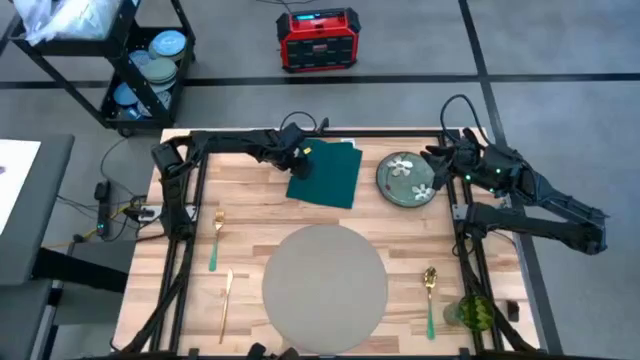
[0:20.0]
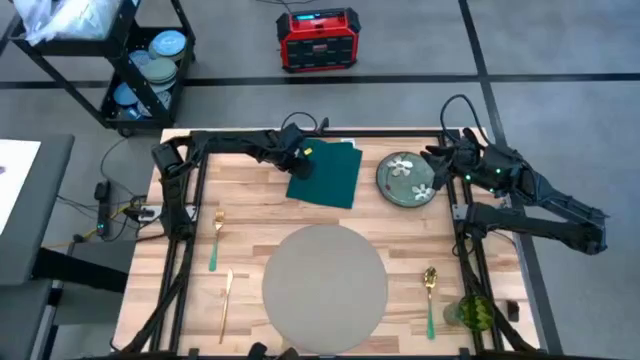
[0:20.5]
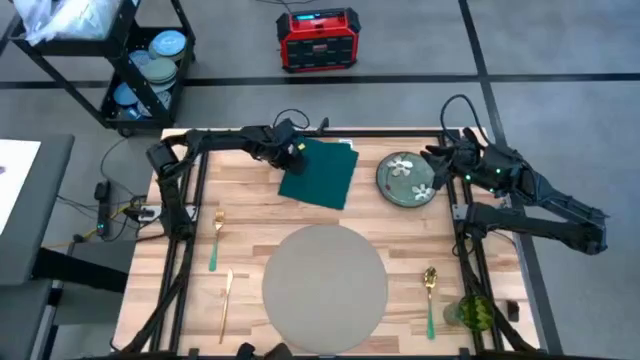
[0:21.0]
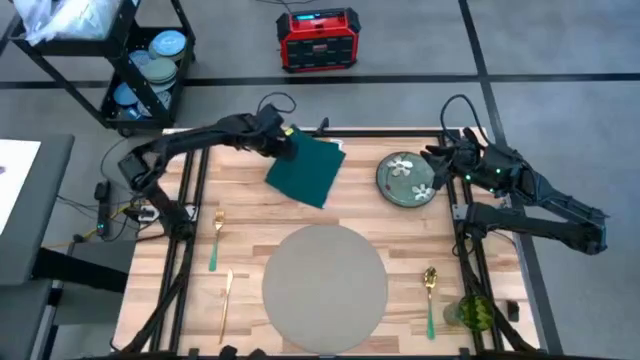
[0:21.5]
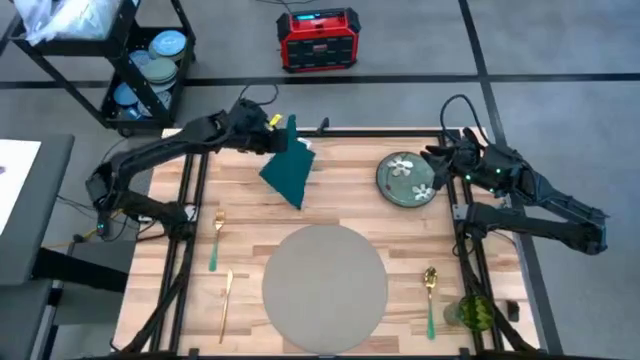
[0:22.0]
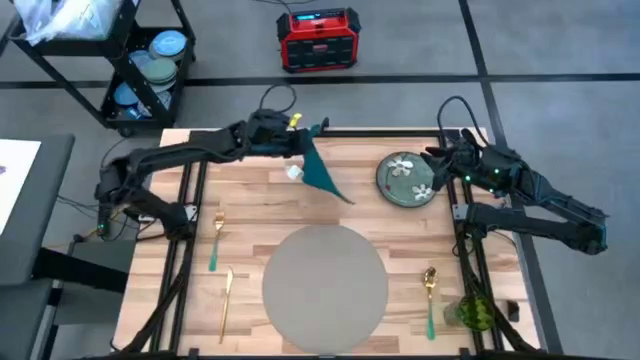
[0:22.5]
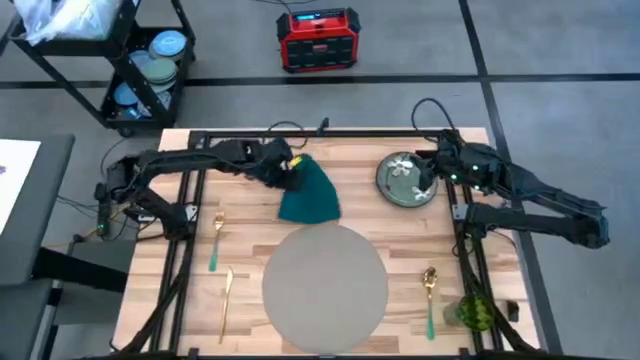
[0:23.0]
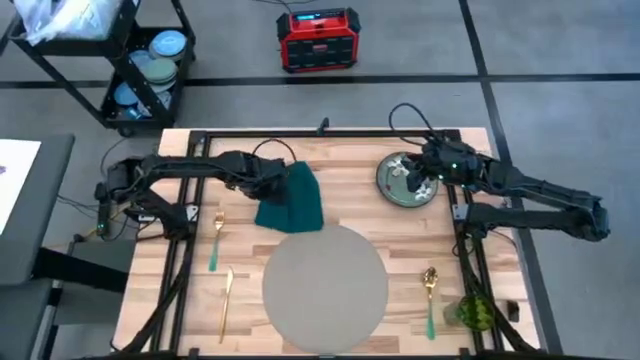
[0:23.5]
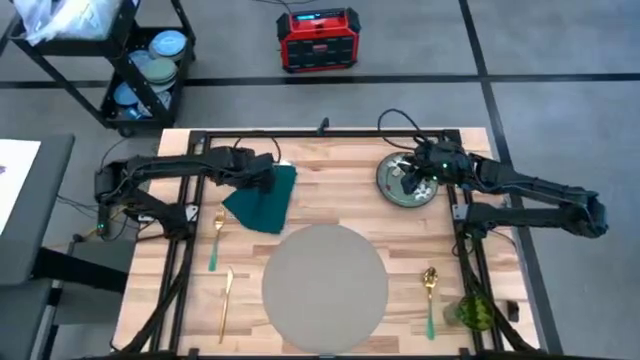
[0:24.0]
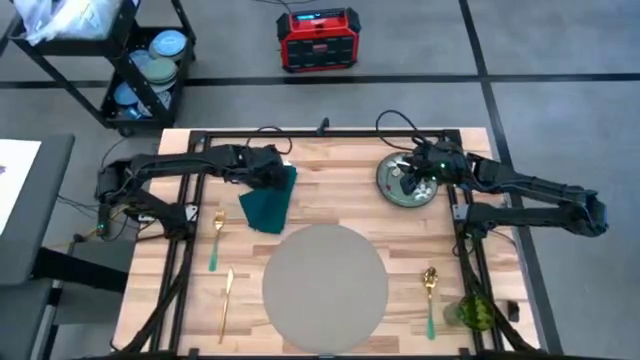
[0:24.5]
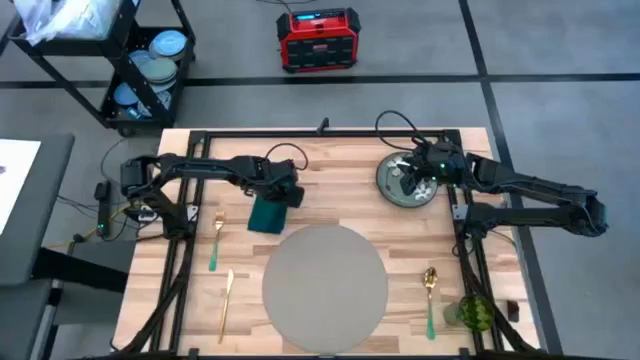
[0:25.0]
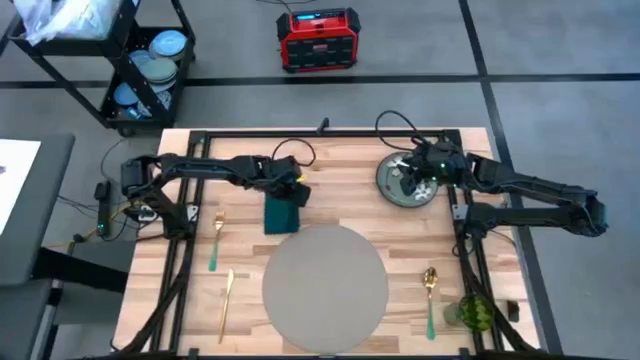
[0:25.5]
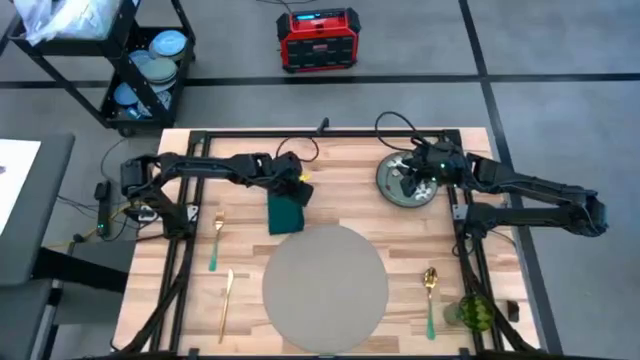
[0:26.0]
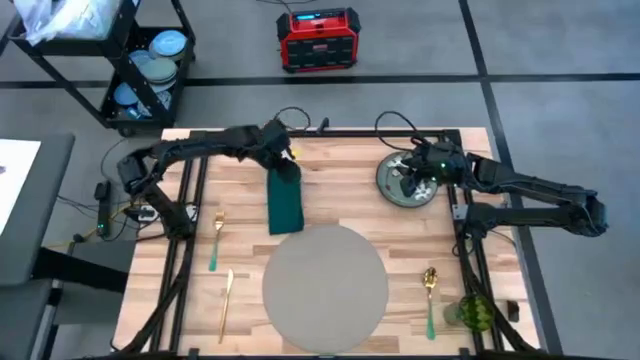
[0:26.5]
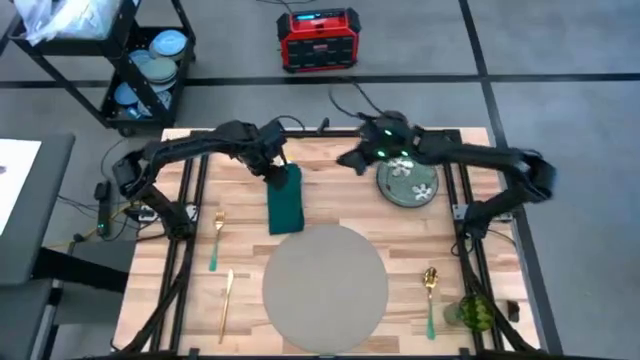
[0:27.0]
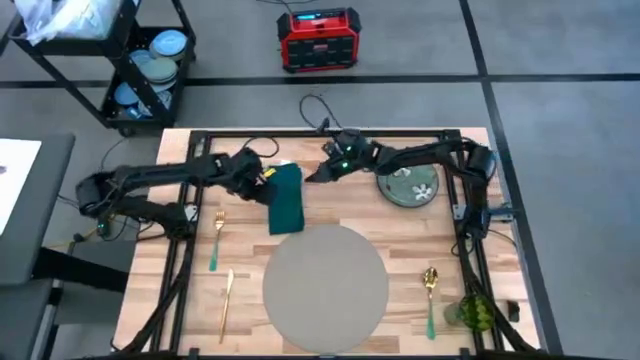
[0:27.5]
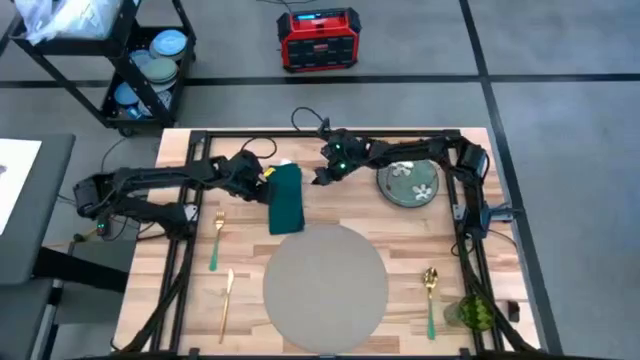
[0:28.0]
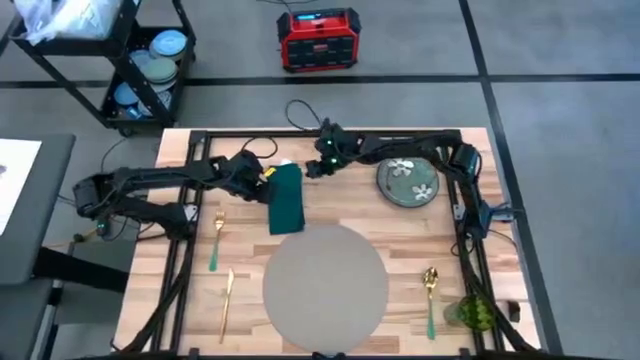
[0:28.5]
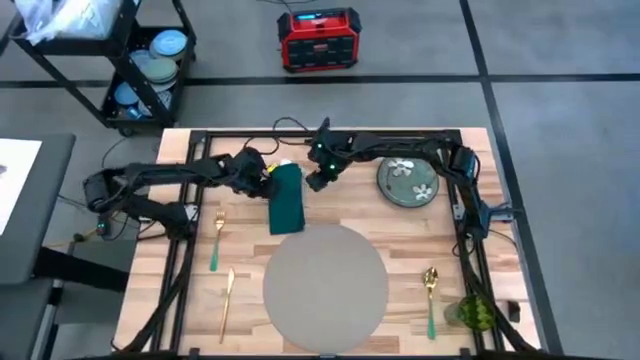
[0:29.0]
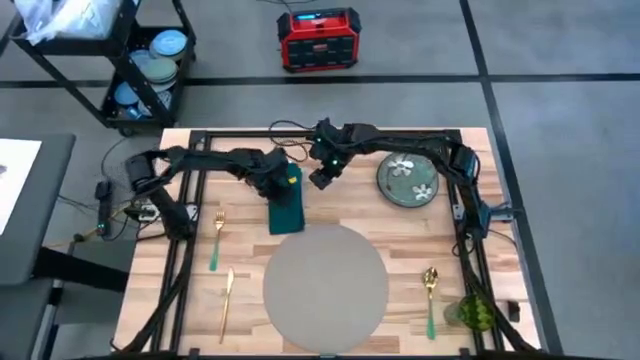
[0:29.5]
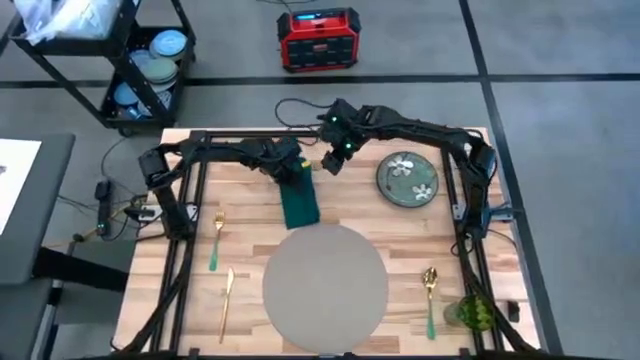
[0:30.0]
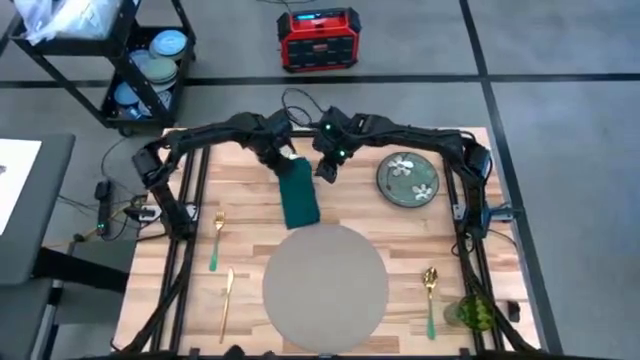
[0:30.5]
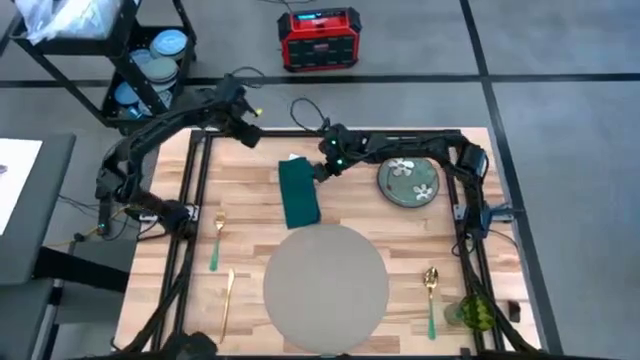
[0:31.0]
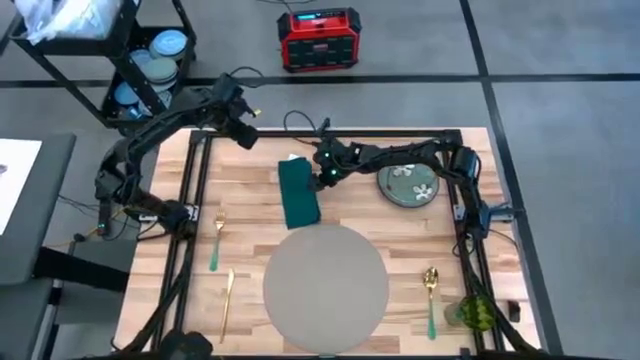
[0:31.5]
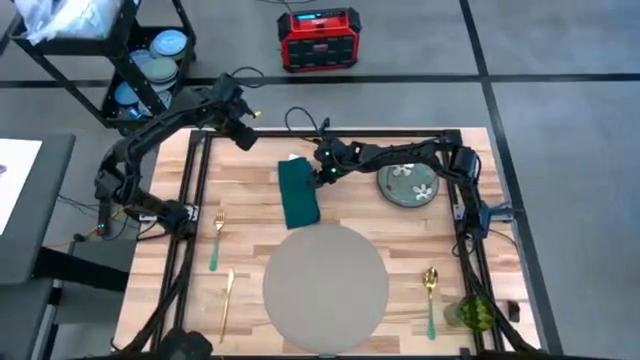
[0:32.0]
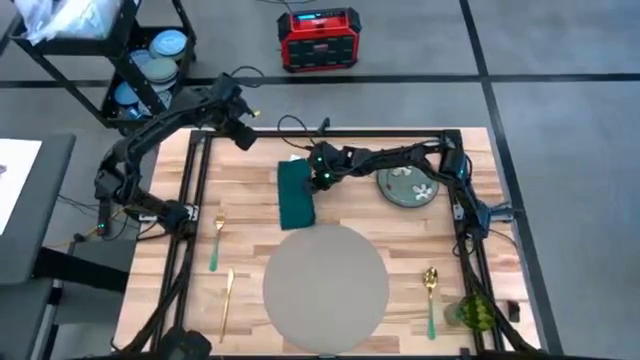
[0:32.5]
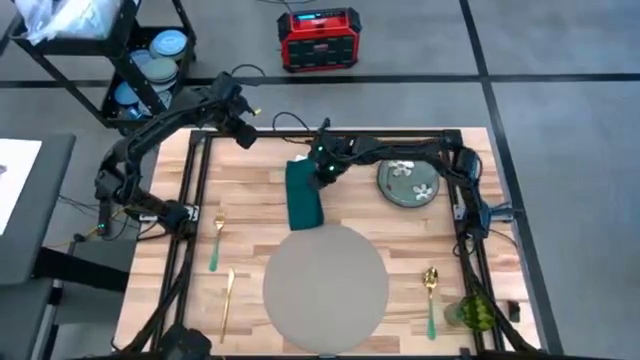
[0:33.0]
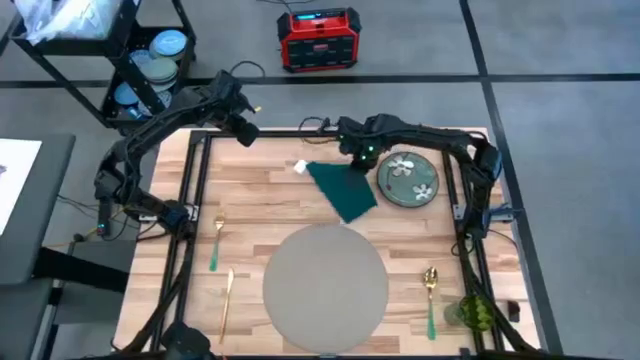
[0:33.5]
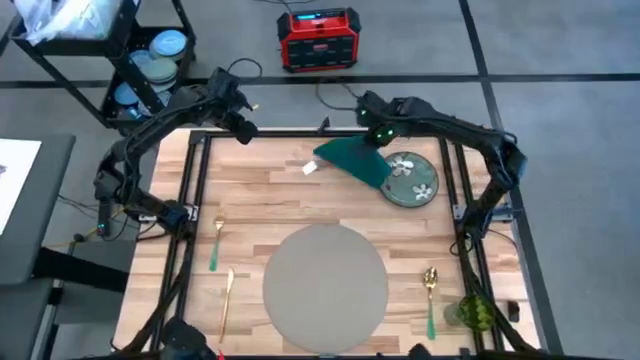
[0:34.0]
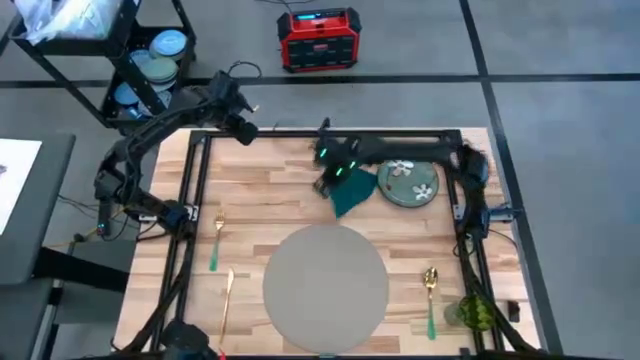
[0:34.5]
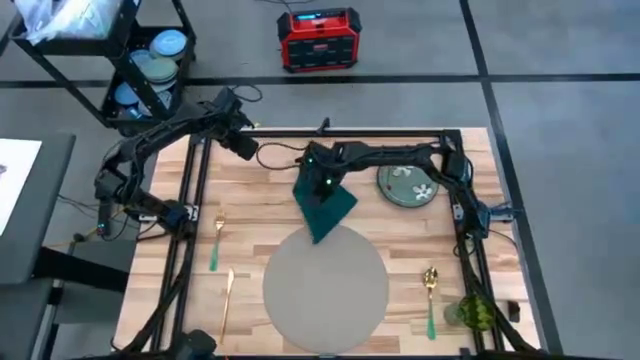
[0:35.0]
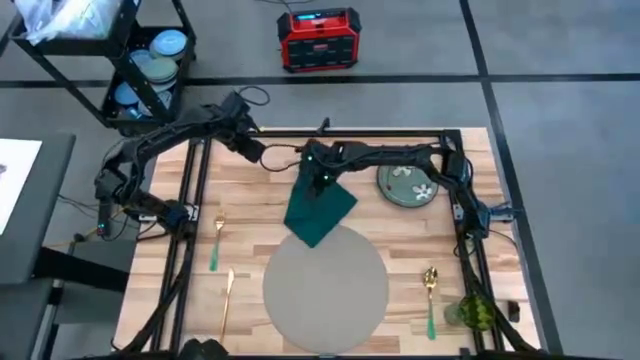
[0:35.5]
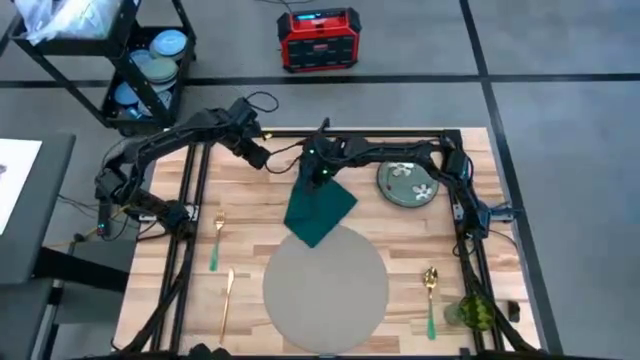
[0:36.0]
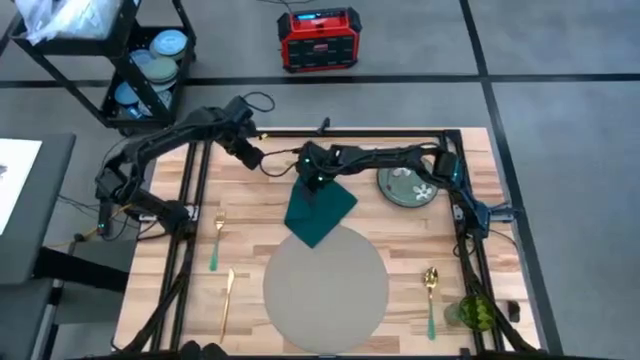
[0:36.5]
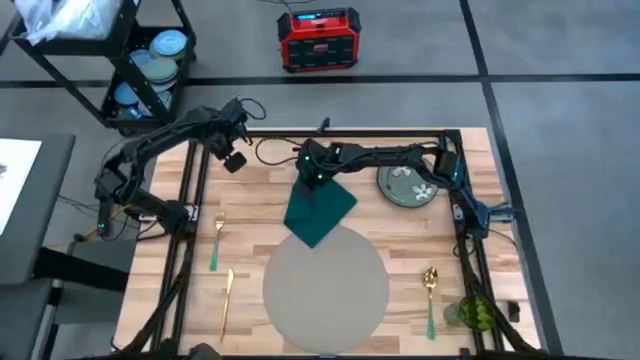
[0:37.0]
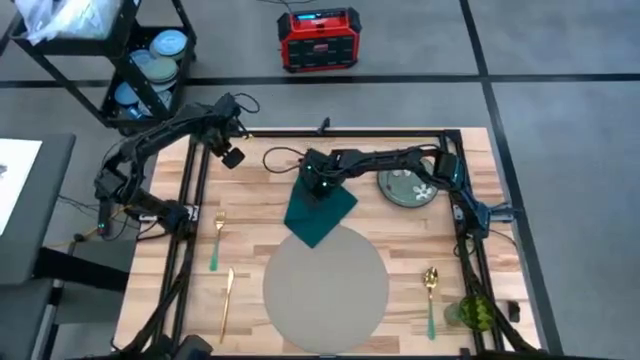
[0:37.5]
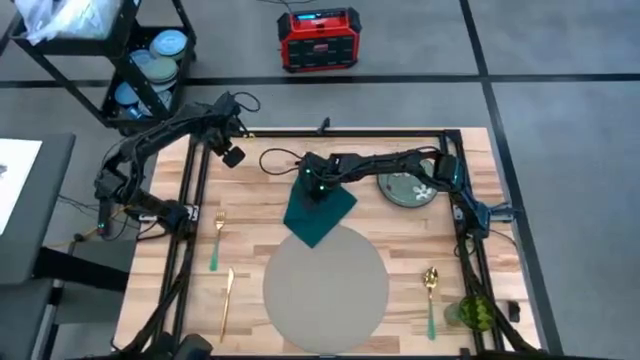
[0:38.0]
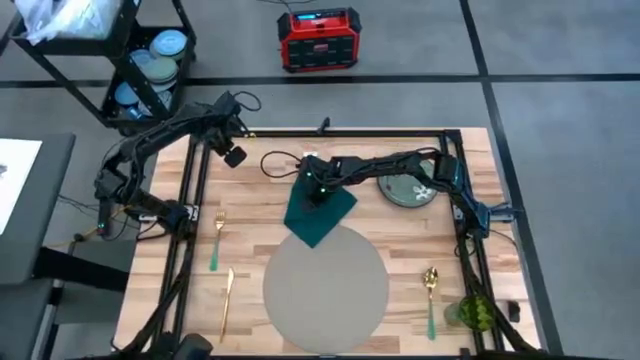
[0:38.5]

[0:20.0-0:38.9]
Task: Set table place
Fold the green napkin

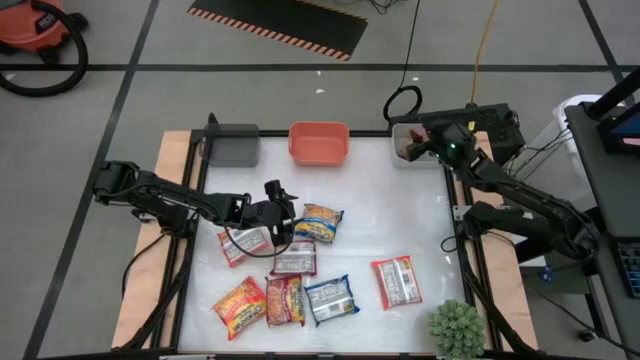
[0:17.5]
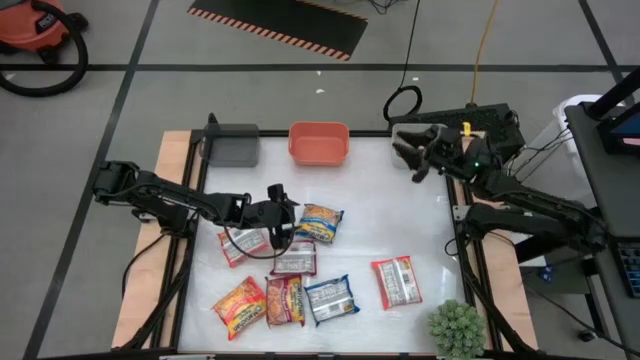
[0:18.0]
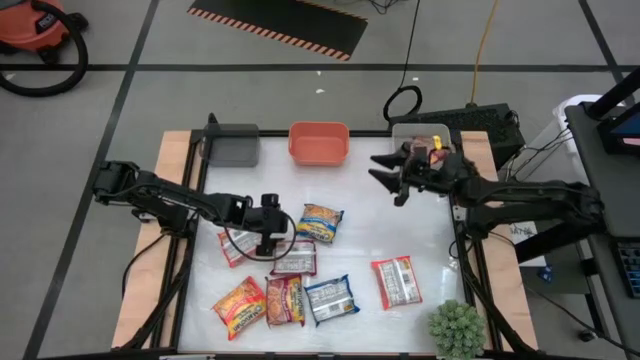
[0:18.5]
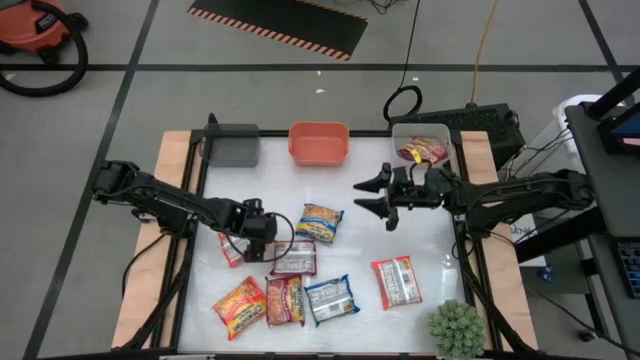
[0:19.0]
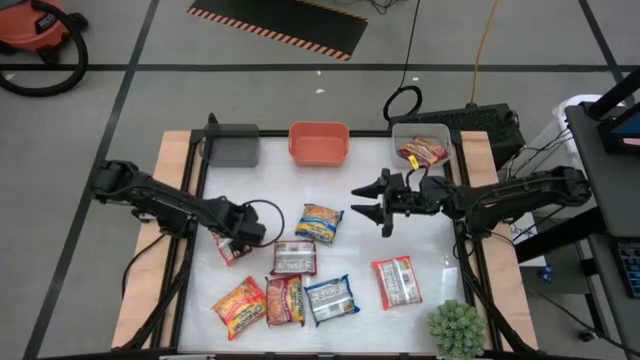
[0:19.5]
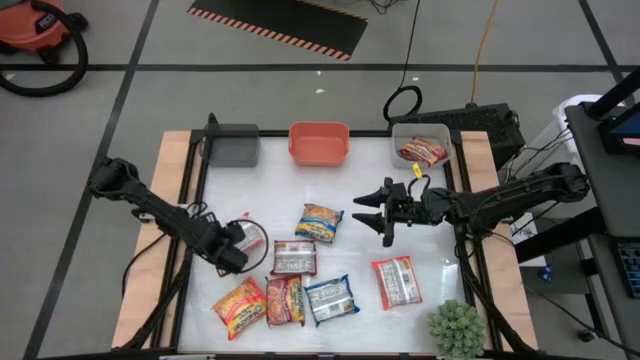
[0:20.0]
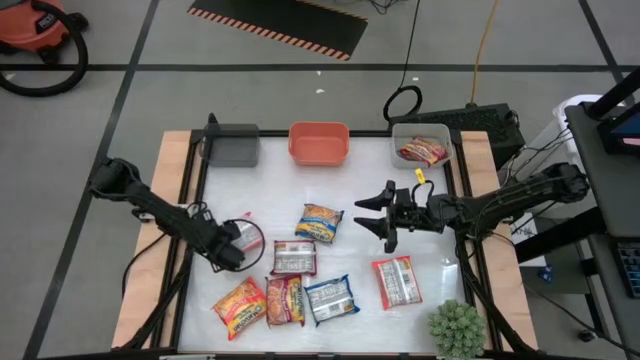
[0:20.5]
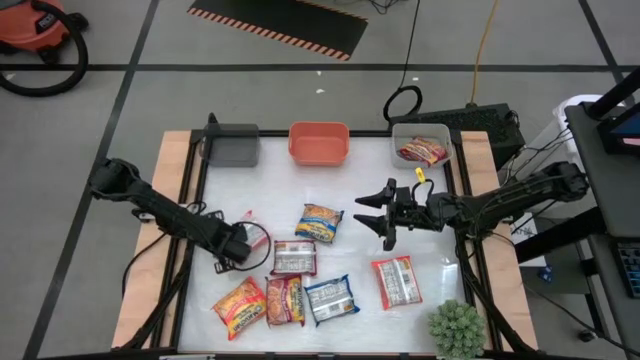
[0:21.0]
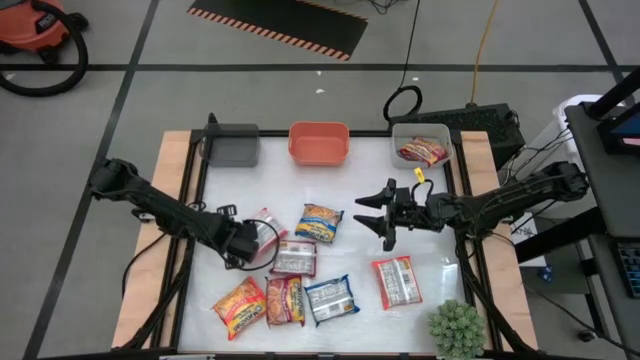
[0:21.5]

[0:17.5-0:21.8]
Task: Sort Maruchan noodles
Put the top left orange noodle pack into the black bin
